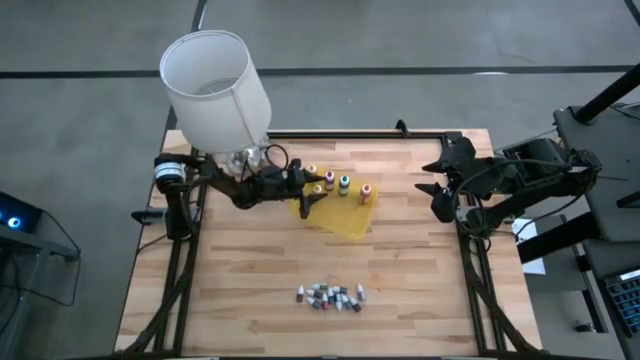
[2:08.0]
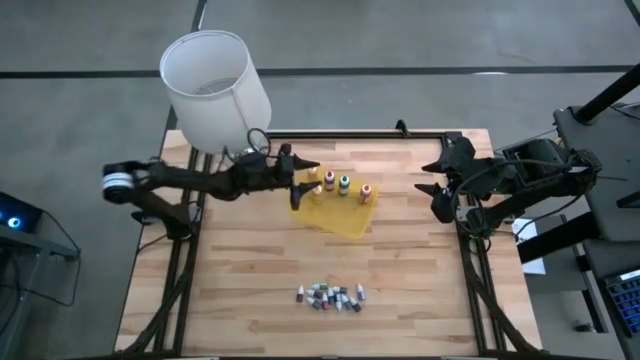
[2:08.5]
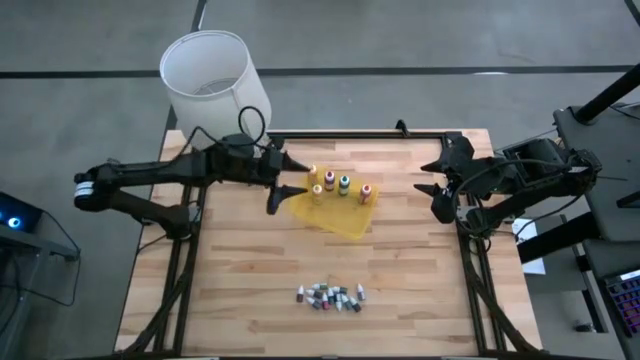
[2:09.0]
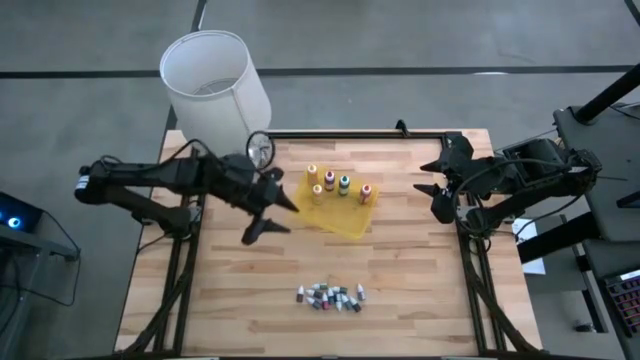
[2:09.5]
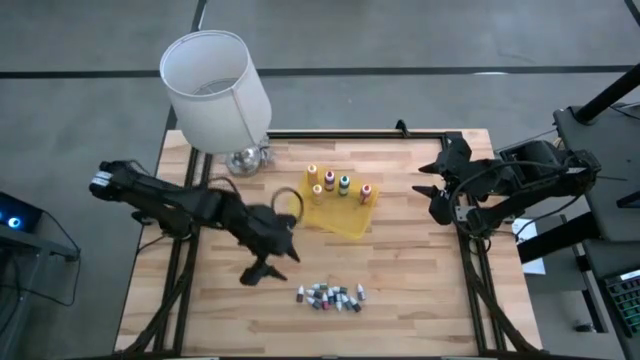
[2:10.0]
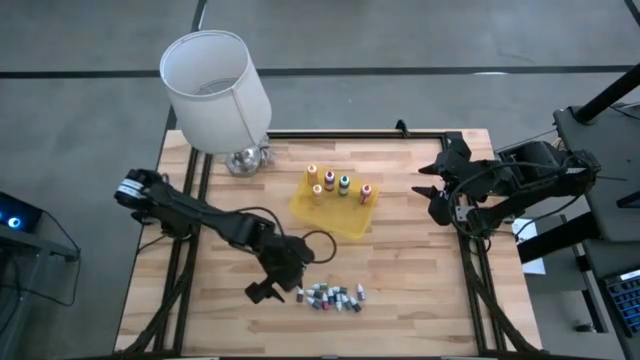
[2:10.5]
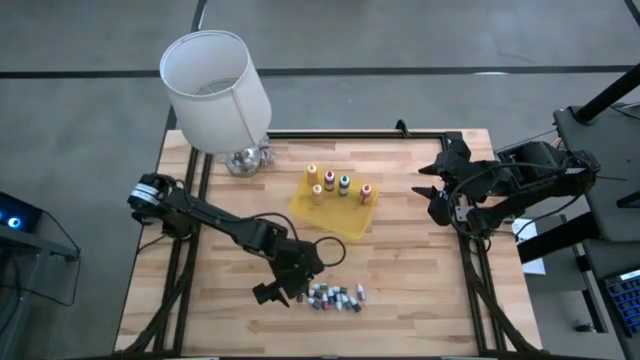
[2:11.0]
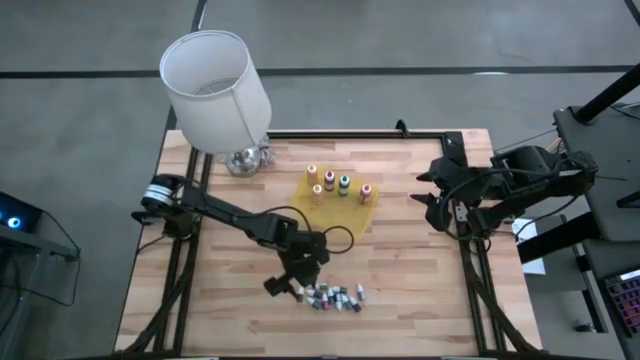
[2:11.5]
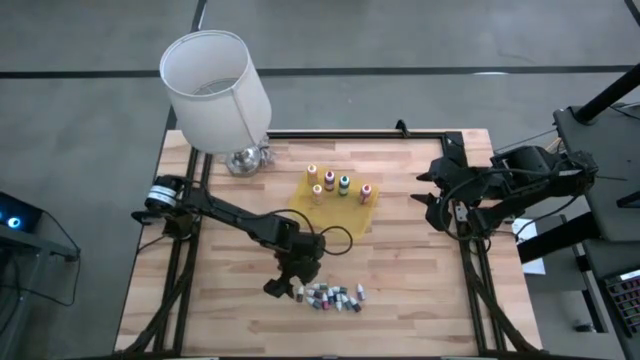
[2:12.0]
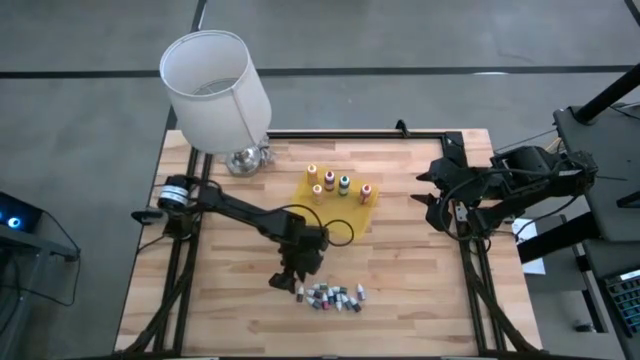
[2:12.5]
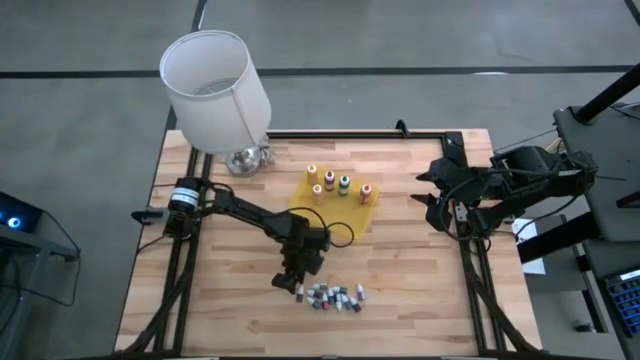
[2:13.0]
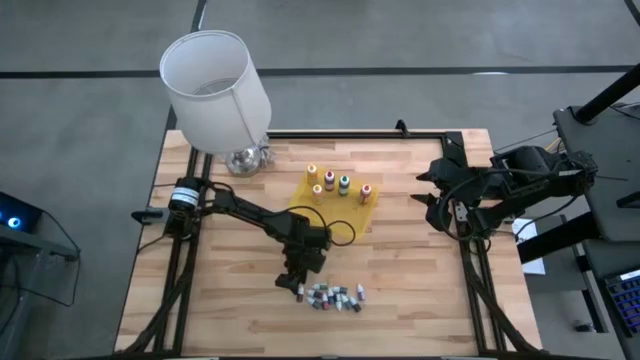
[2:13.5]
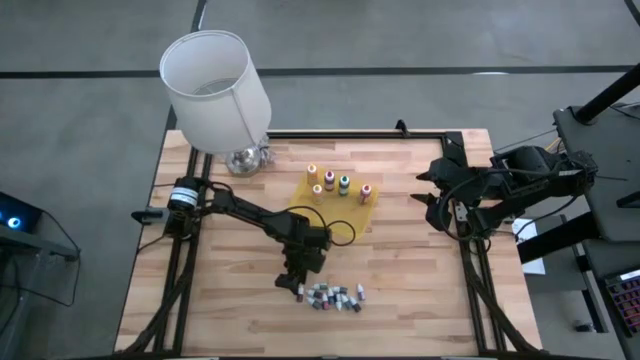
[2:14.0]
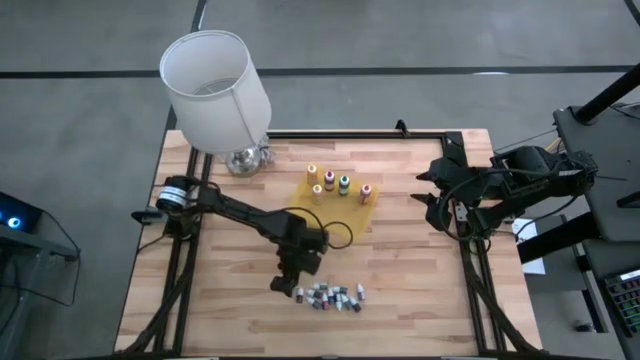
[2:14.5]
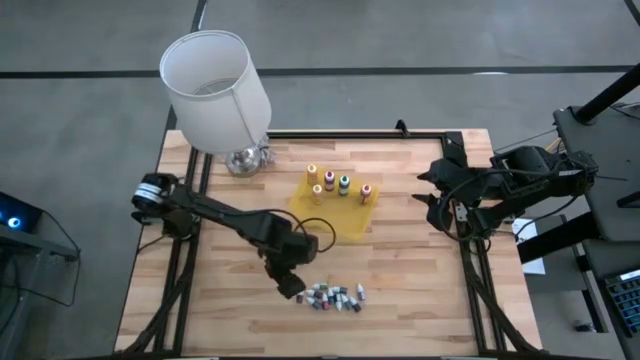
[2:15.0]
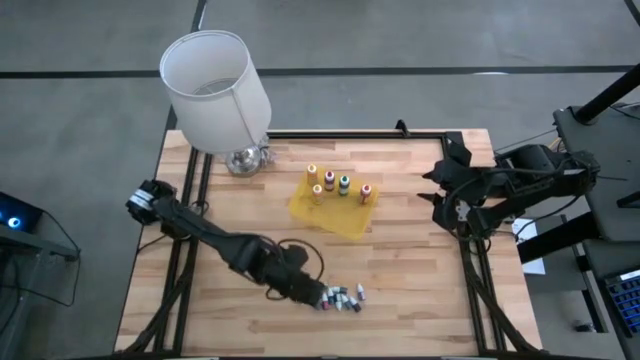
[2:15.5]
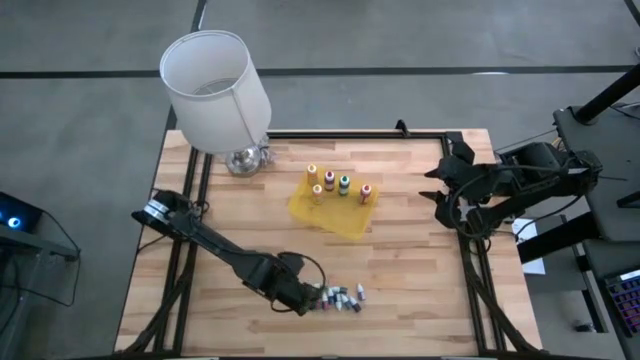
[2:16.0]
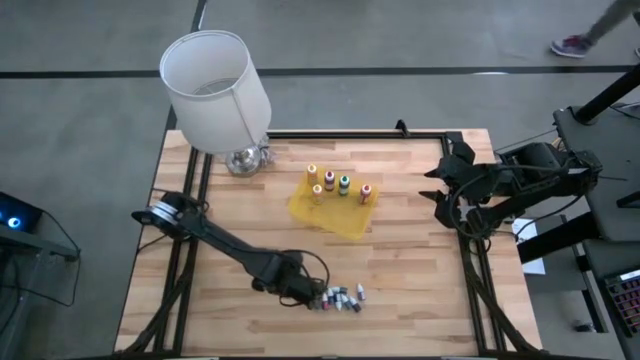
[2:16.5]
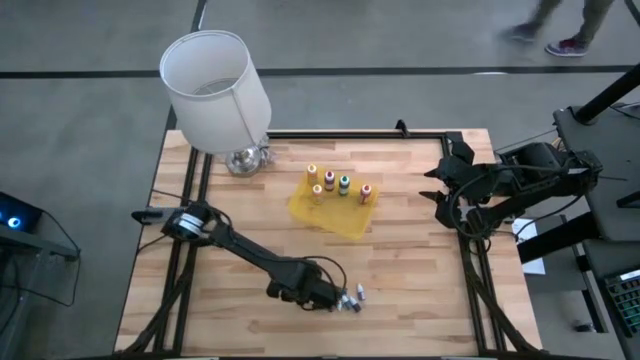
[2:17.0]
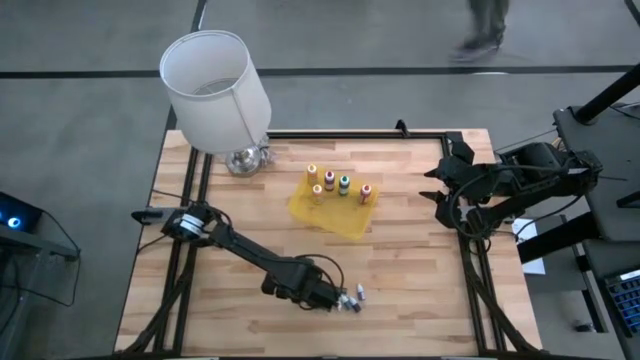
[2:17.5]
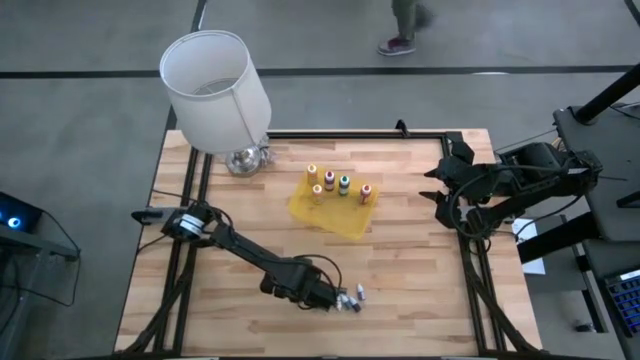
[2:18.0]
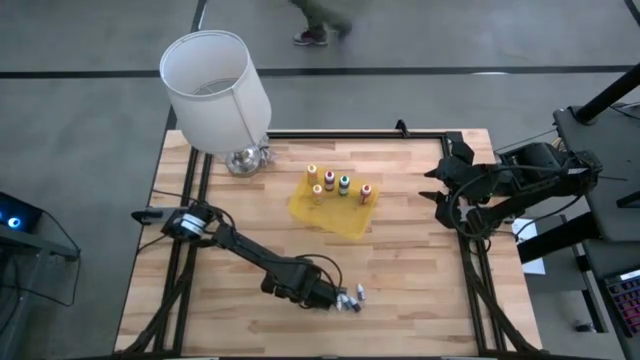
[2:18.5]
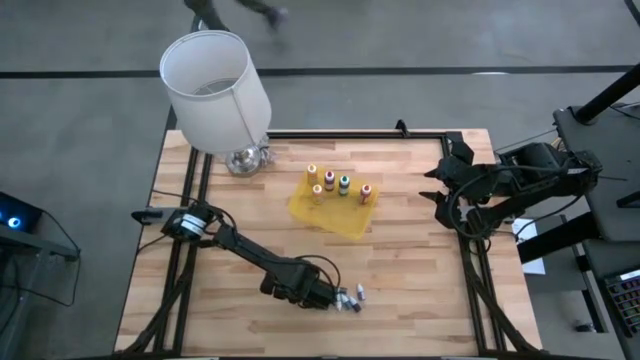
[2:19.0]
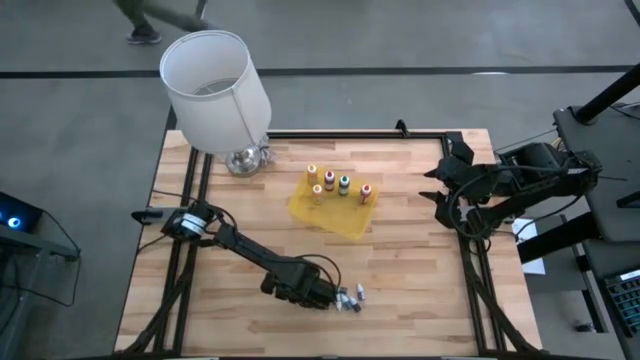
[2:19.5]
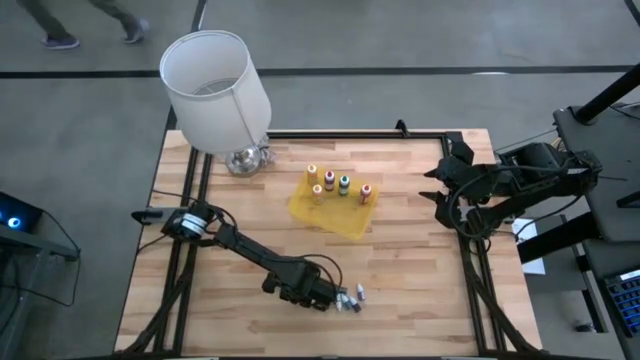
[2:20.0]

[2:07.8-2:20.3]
Task: Pick & Place food coloring
Put the small orange food coloring bottle into the yellow bin

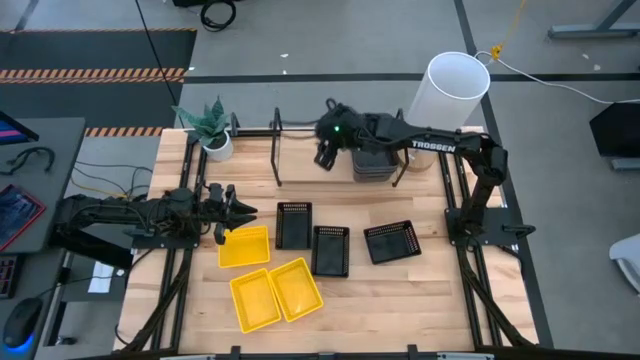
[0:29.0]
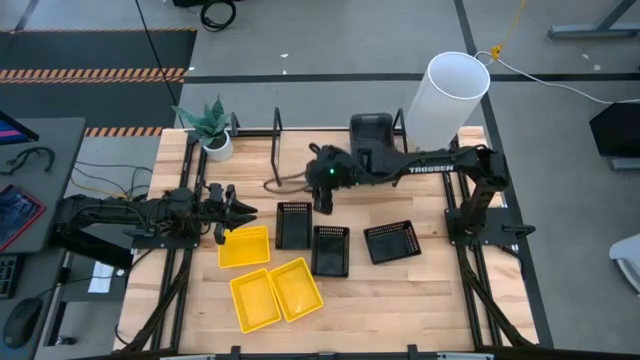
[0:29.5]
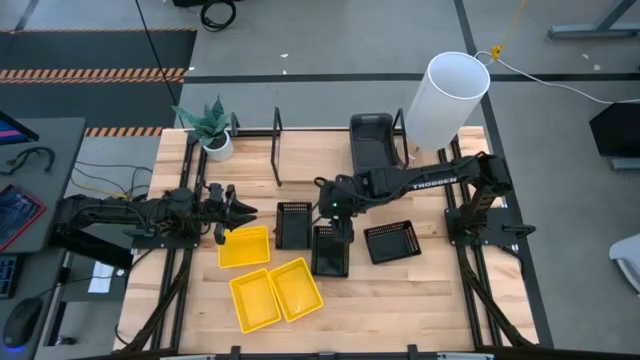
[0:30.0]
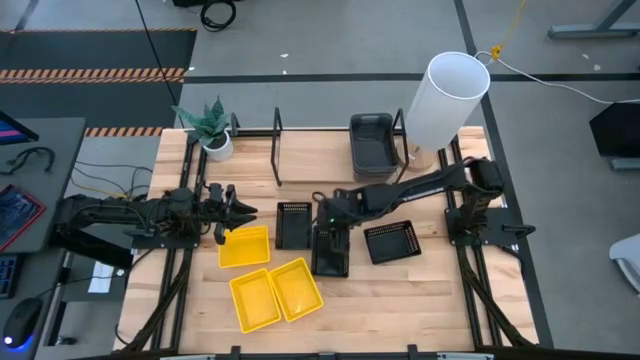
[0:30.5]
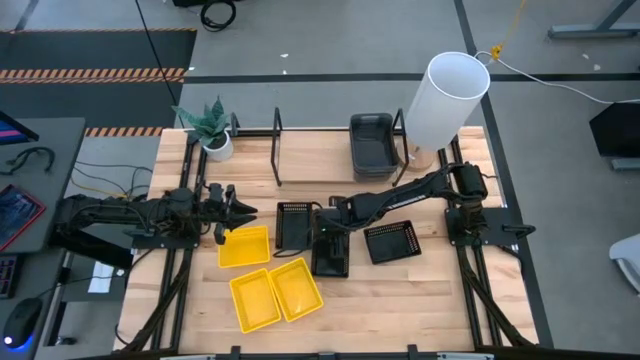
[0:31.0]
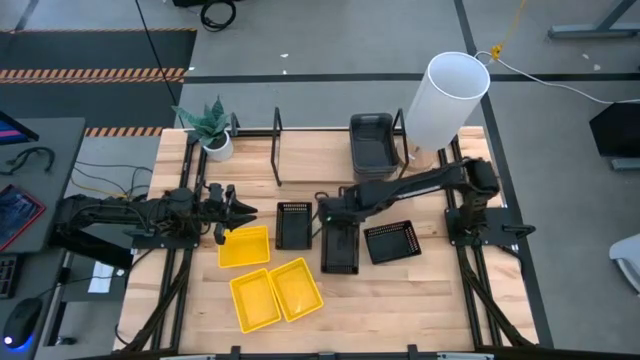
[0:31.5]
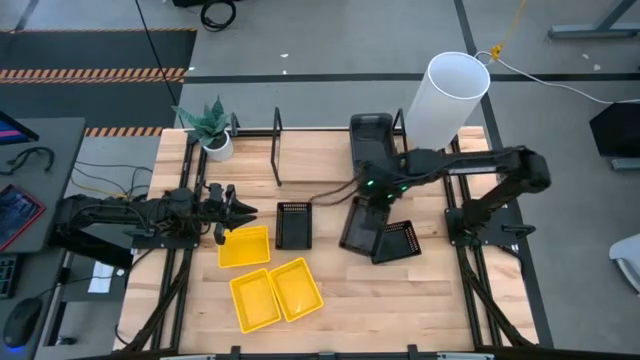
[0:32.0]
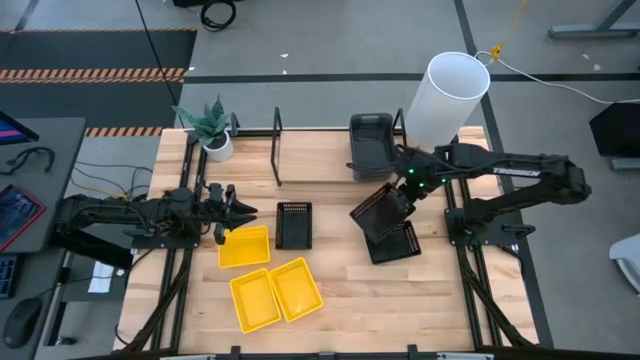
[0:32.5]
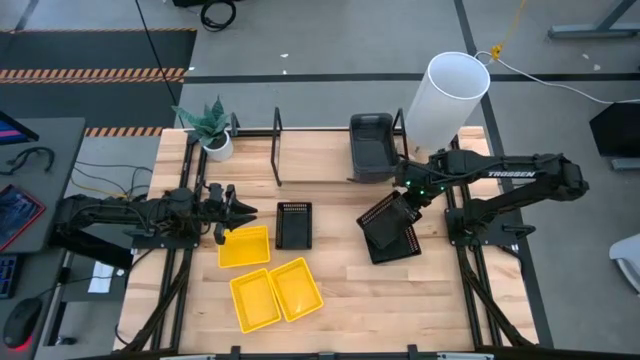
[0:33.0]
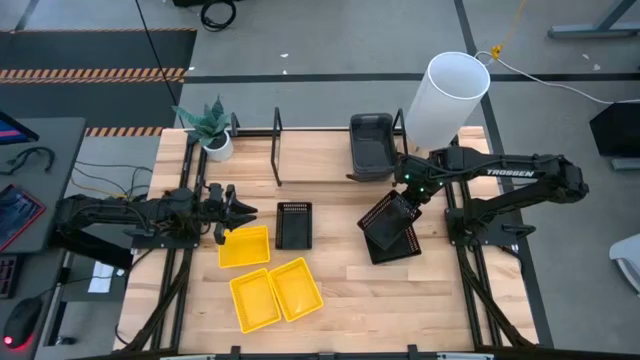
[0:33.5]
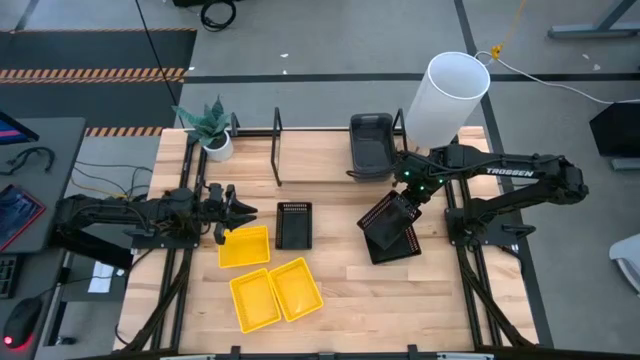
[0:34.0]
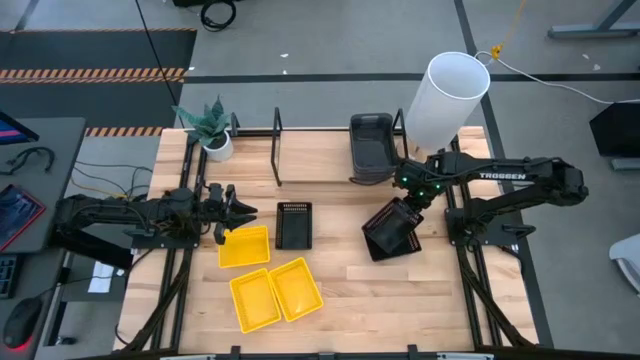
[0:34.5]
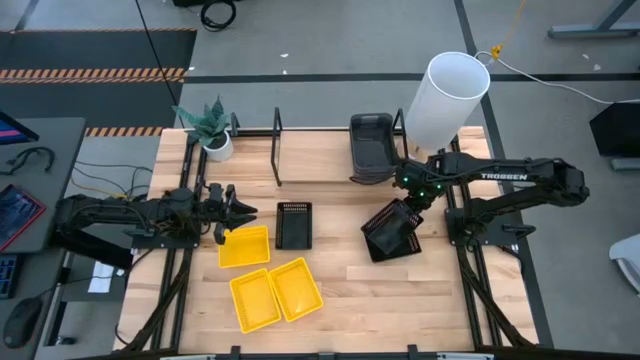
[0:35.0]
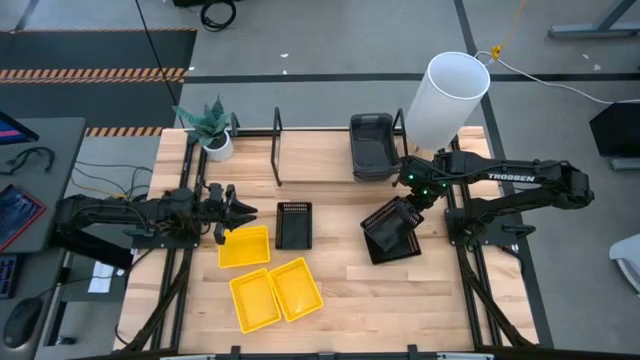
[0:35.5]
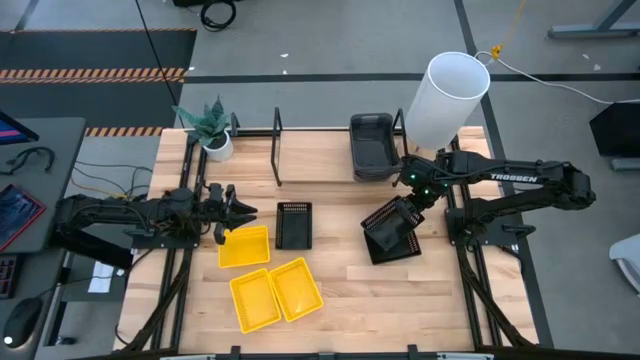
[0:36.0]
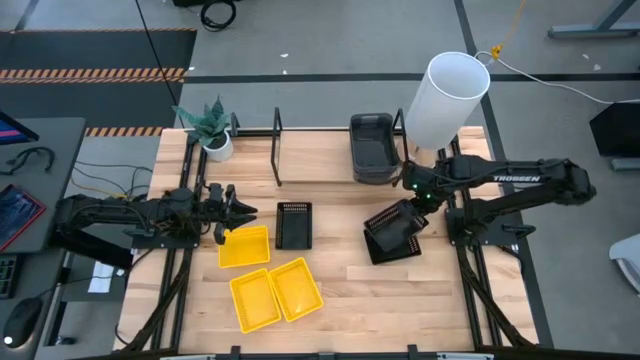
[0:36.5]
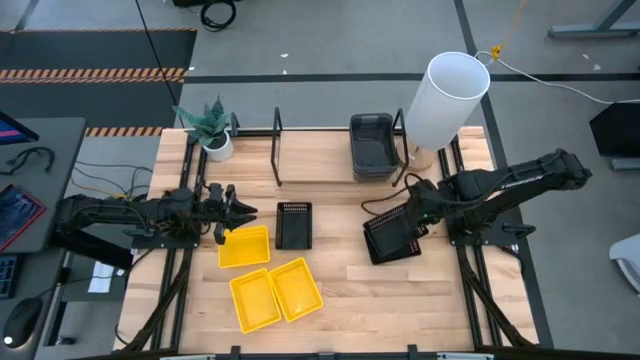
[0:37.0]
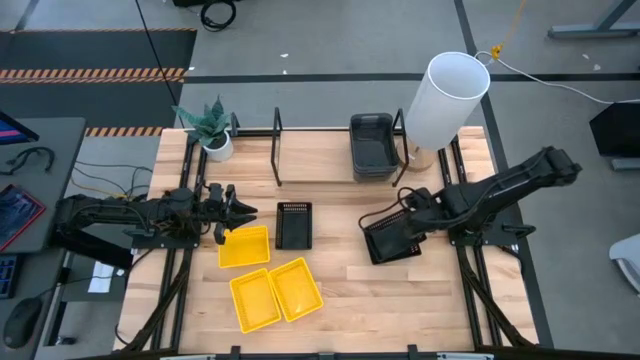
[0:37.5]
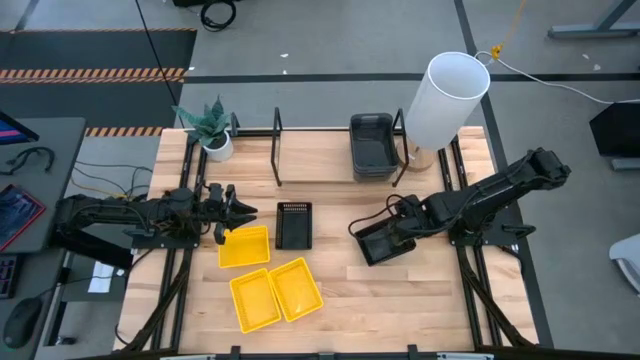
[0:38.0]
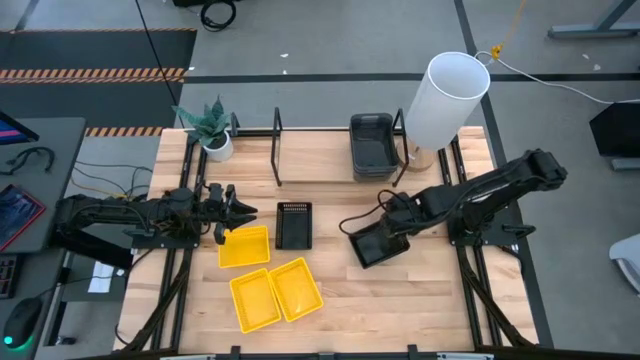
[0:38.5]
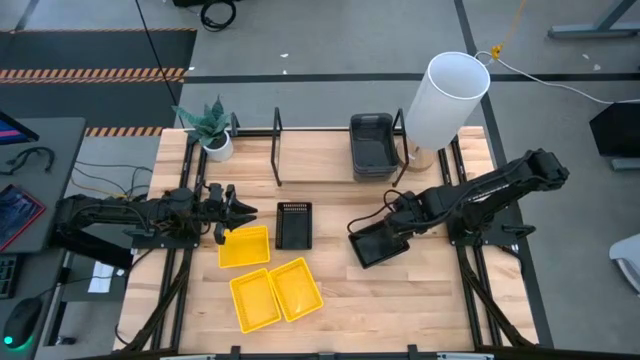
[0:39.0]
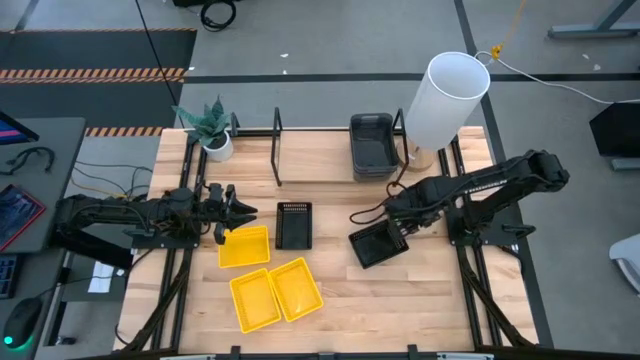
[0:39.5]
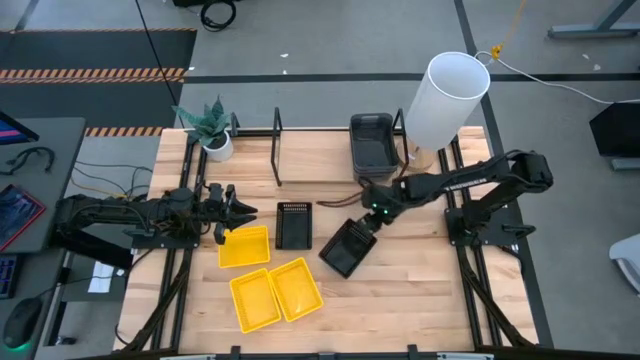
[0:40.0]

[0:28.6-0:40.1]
Task: Stack baskets on shelf by color
Stack the middle black bin on top of the right black bin
